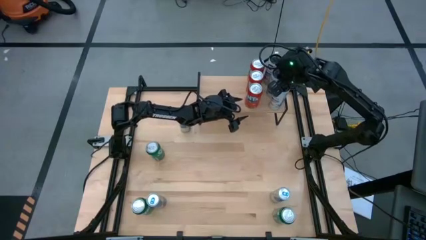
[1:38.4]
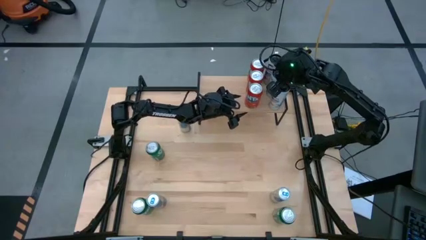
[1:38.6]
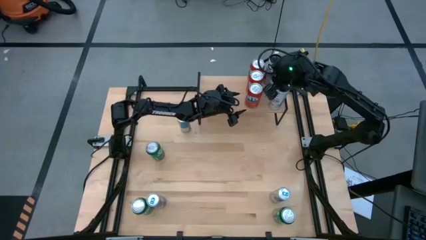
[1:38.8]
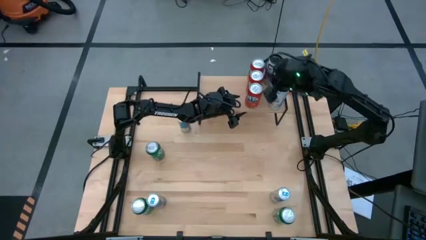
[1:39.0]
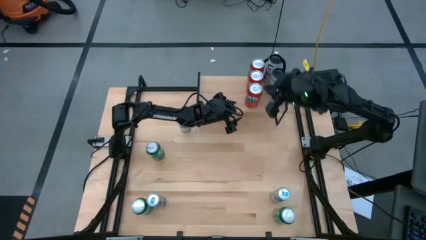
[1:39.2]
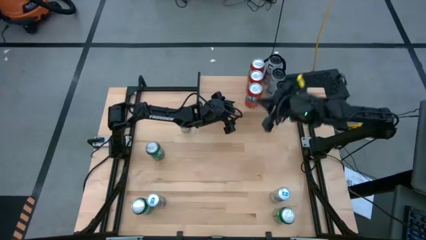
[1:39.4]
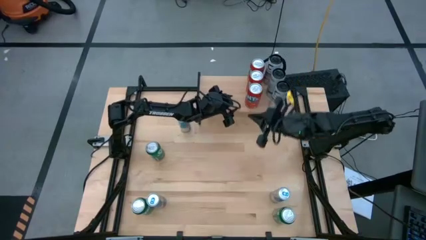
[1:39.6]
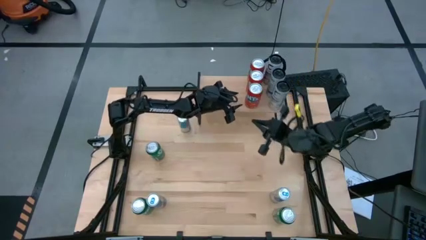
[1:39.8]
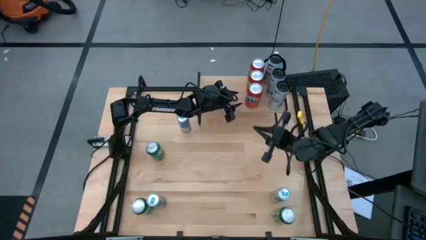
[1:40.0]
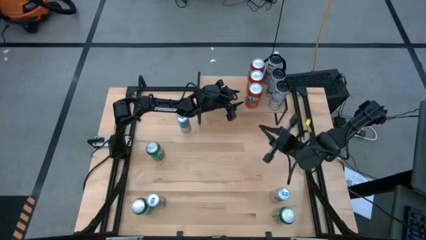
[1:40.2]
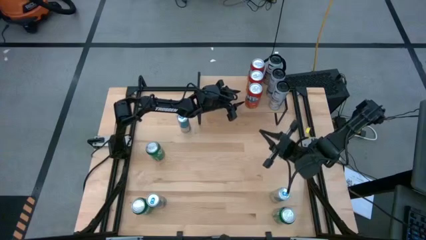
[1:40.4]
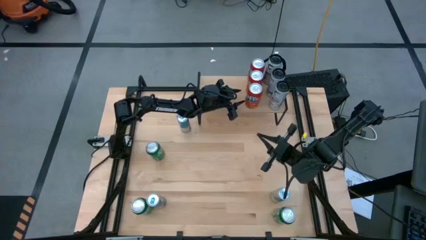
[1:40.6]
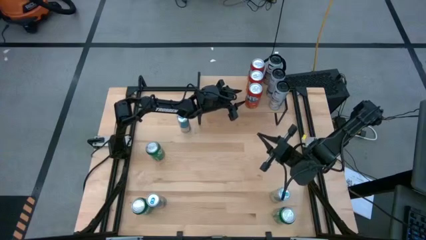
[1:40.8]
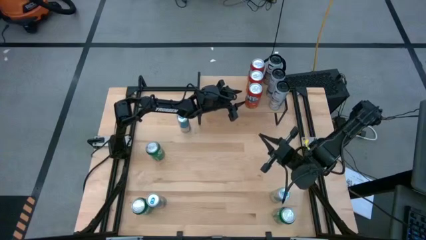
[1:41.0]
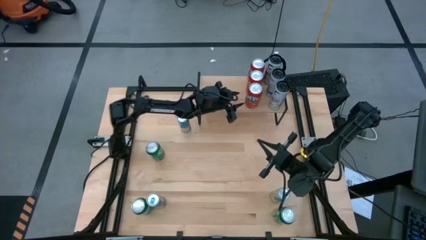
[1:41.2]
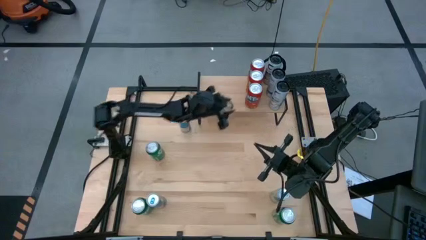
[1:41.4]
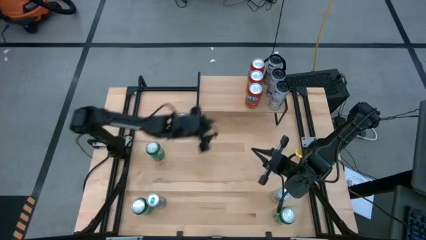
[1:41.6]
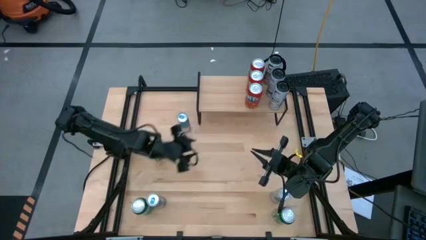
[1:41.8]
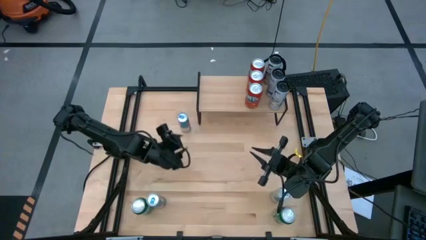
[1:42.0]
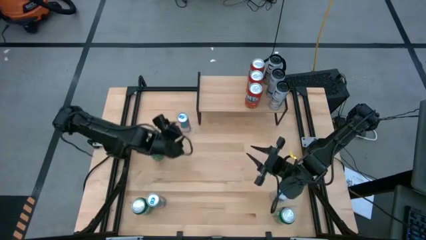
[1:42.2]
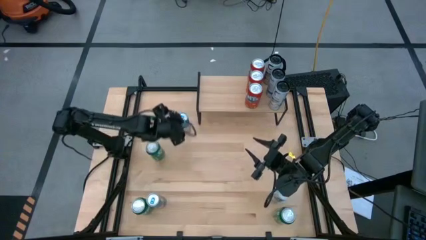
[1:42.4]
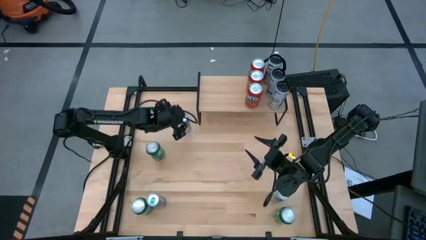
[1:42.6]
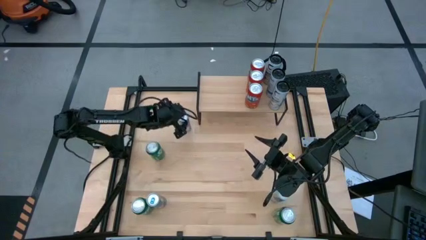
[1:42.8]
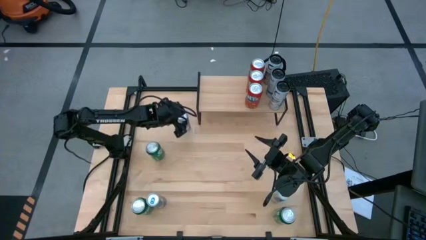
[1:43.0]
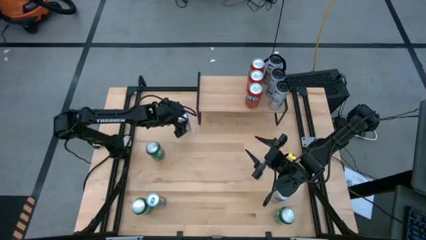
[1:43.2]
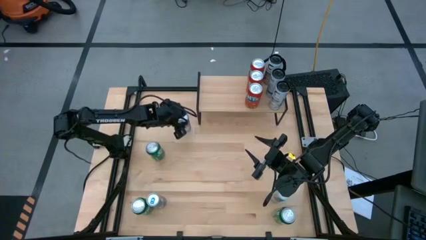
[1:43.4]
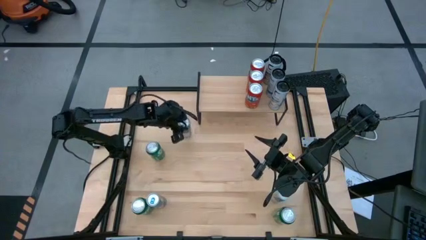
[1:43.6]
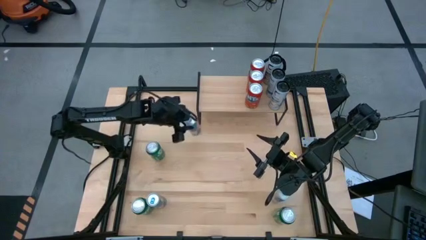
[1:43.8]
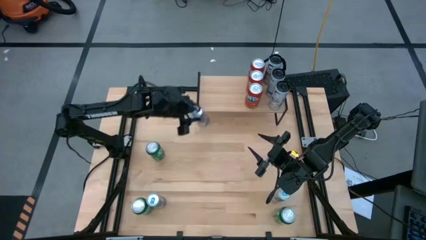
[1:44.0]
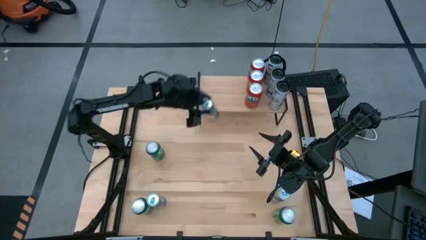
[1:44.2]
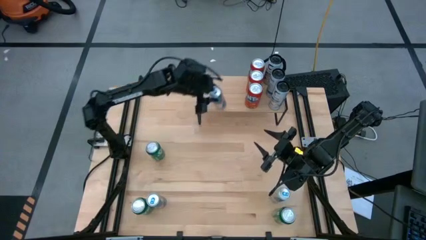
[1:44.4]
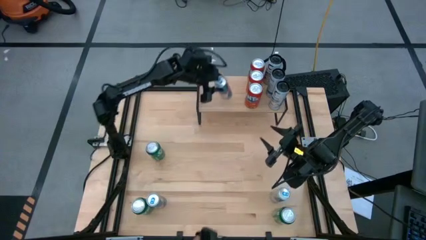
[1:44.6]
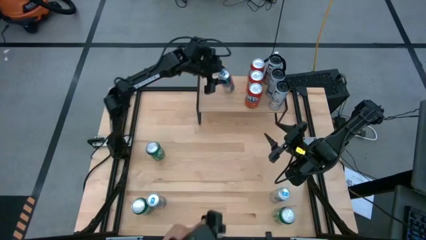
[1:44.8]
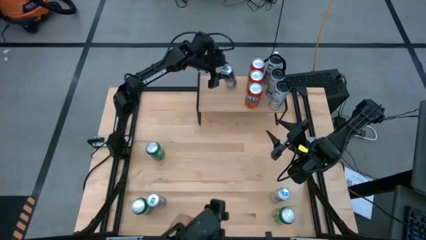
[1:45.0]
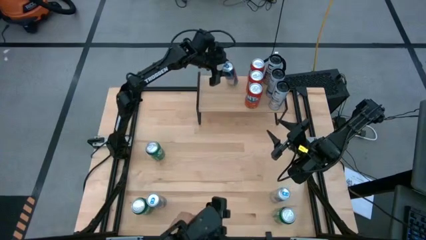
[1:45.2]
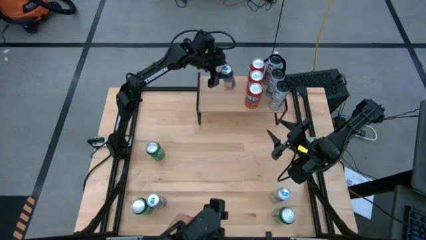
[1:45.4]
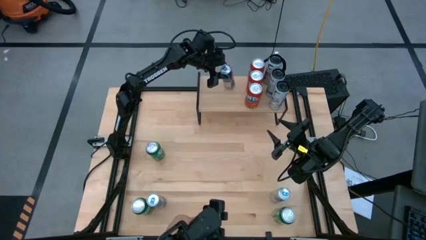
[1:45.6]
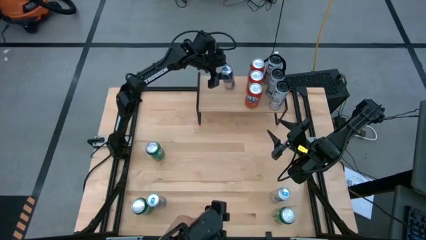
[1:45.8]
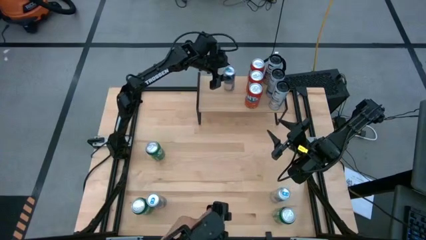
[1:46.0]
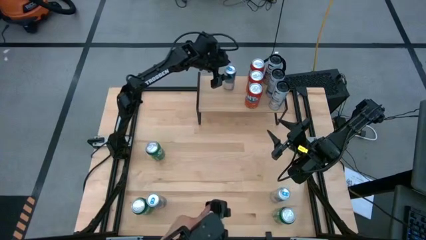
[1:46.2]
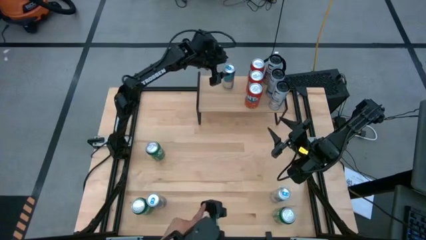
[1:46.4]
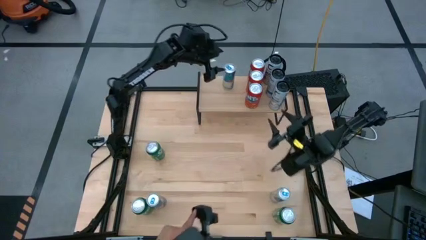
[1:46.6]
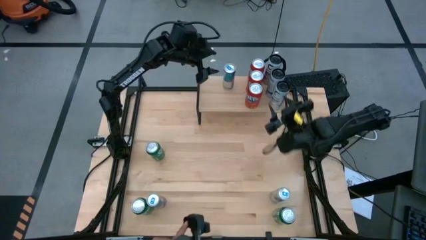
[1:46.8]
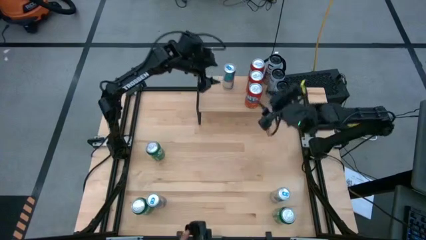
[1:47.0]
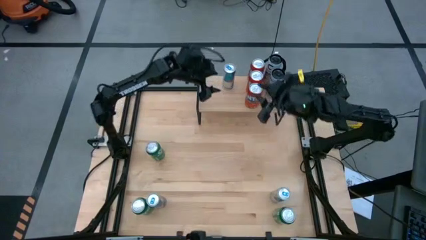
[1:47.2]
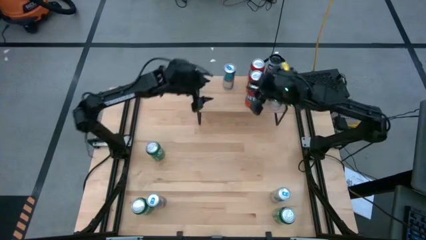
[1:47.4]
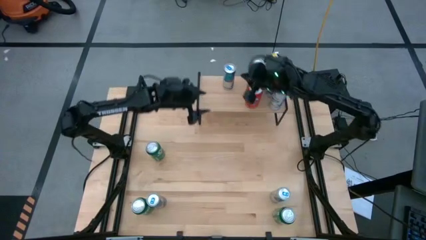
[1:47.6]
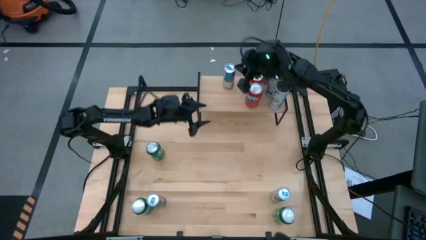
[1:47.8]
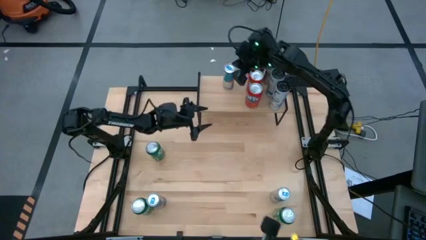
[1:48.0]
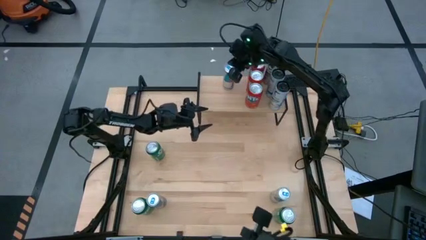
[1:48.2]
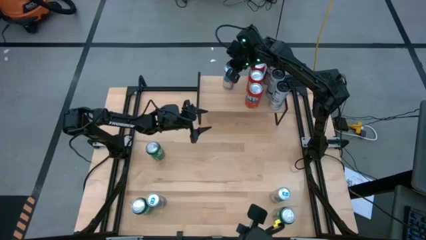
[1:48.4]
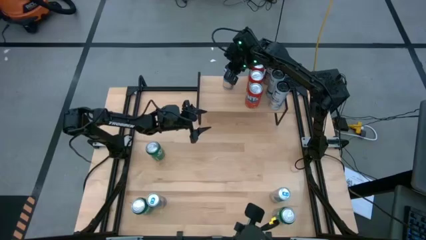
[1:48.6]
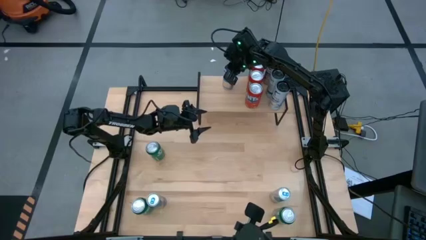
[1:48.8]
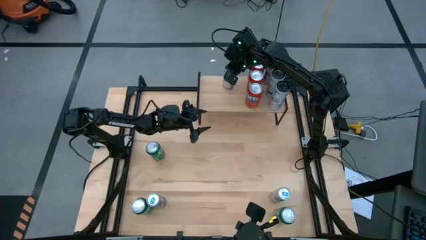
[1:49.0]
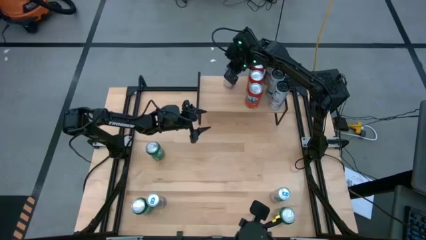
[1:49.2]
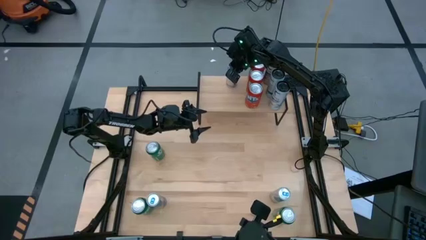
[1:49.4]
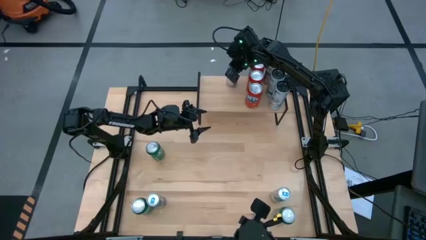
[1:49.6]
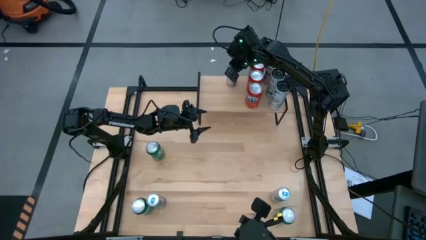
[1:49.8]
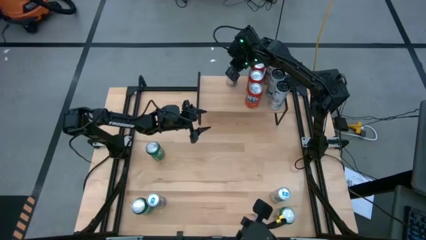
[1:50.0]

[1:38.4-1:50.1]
Task: Place canned beverage on shelf
Put the top blue soda can on the shelf

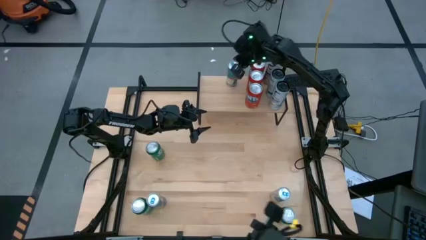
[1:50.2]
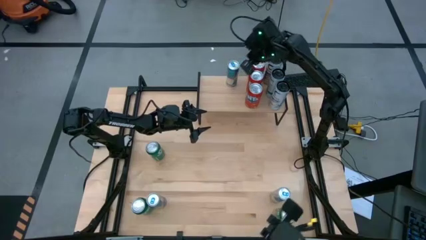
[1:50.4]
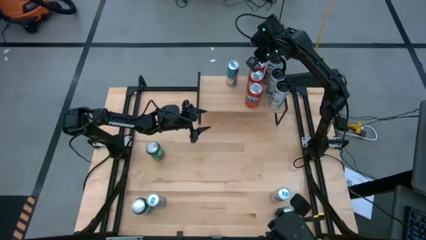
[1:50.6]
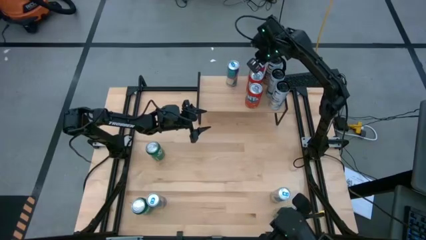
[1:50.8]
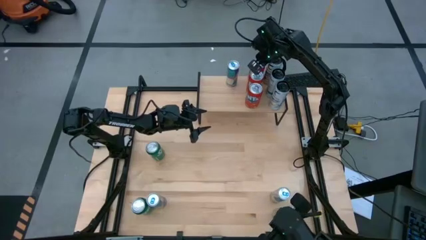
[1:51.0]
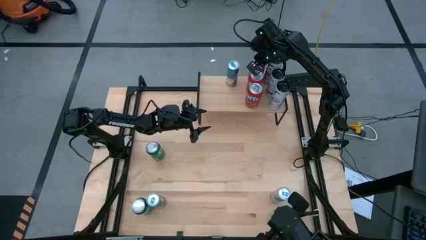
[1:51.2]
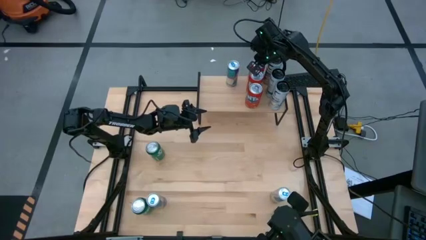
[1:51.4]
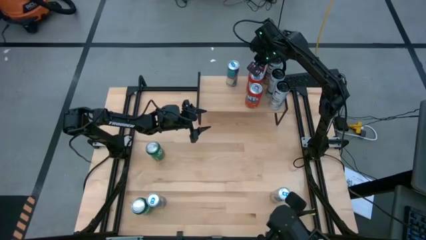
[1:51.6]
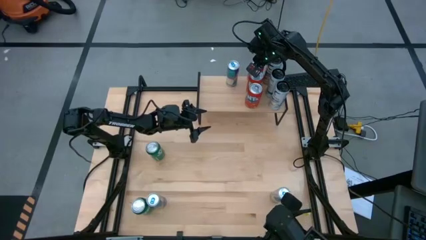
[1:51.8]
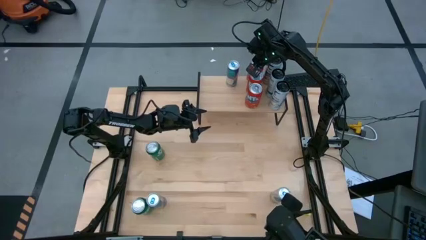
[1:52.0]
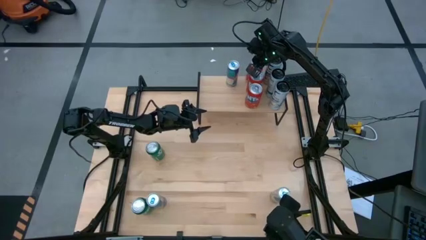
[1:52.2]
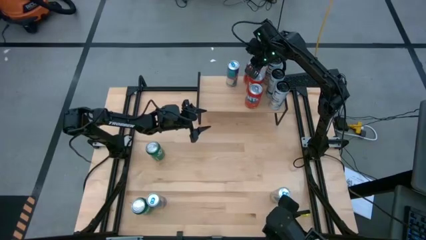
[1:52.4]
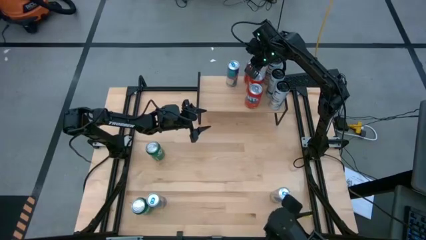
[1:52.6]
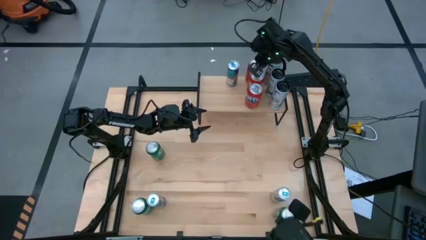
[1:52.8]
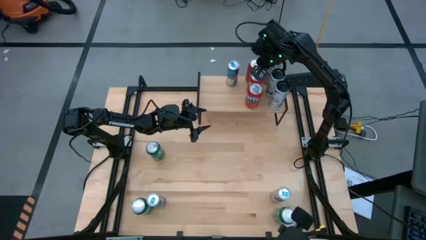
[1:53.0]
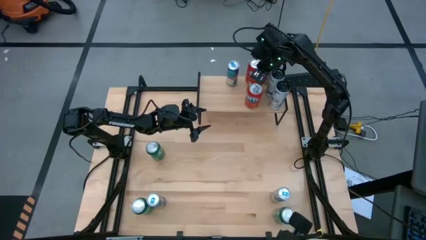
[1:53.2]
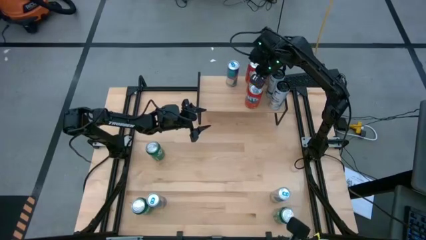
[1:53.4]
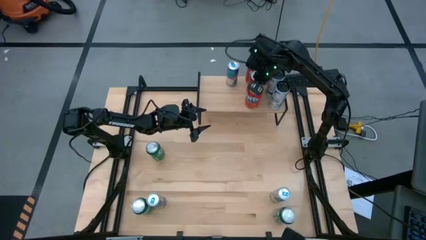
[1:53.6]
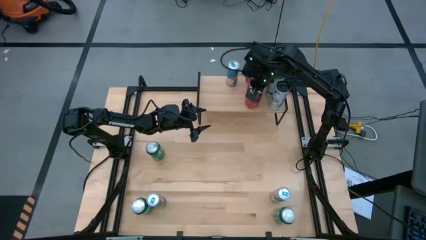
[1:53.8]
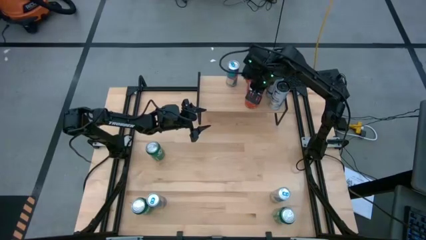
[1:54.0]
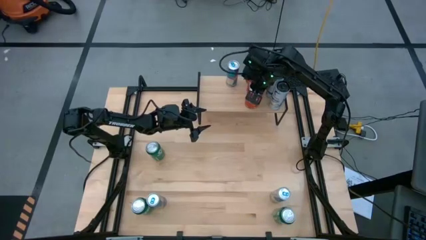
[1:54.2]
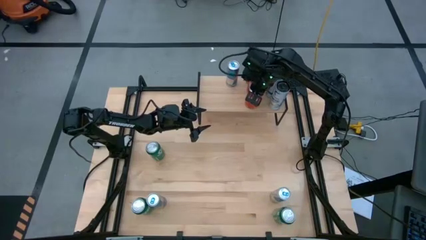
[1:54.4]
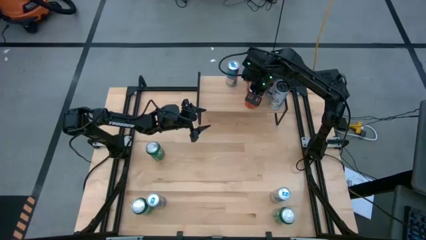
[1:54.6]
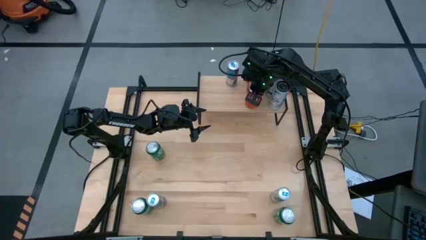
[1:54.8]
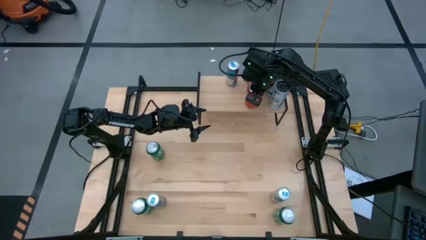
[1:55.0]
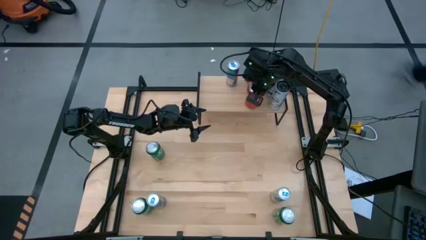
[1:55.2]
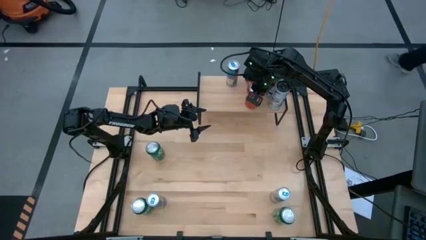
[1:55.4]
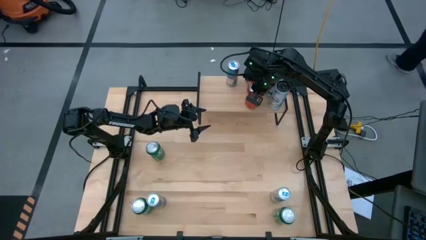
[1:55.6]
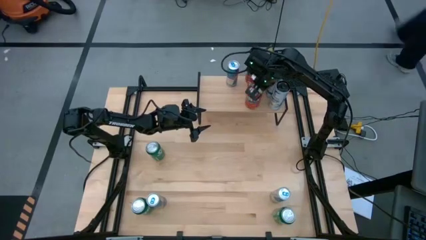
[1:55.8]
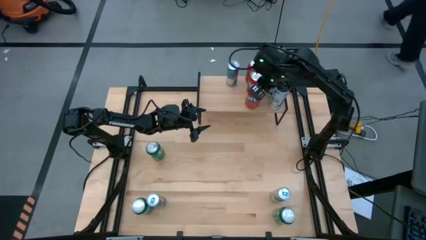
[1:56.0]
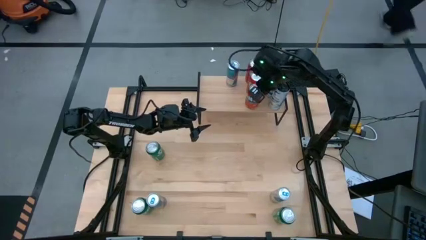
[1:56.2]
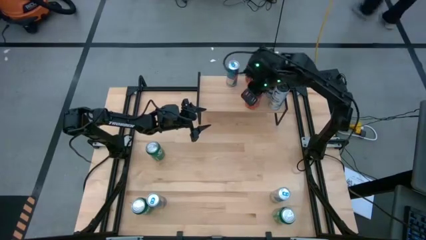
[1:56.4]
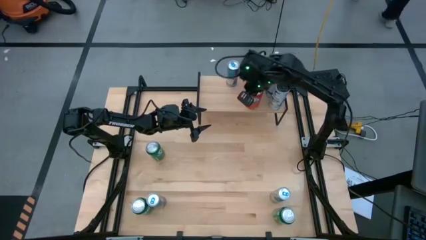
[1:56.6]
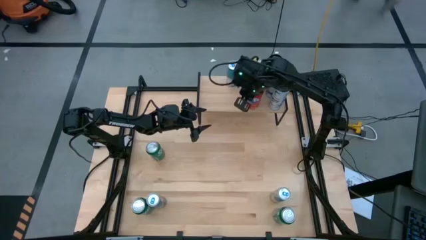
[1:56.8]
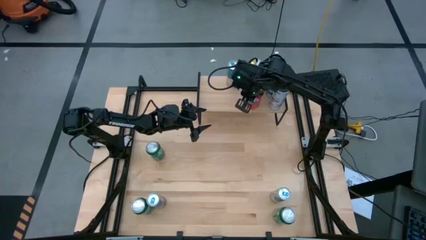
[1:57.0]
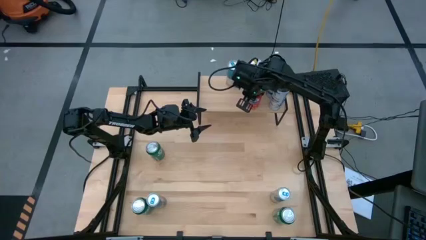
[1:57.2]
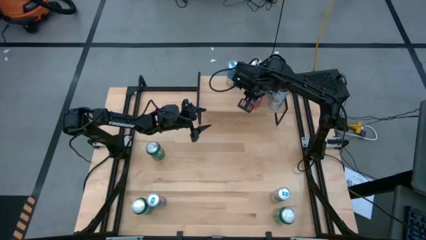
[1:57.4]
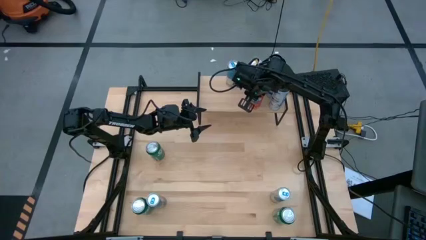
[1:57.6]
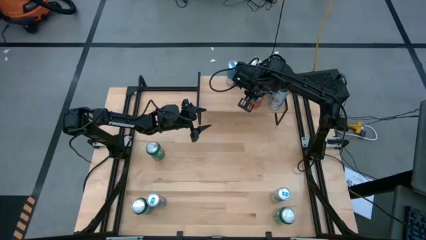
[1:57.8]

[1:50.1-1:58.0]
Adjust the red soda cans on the shelf
